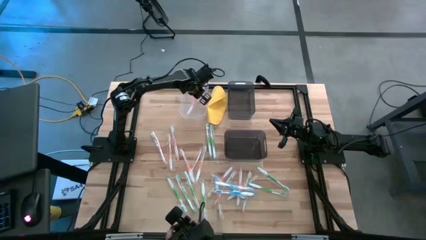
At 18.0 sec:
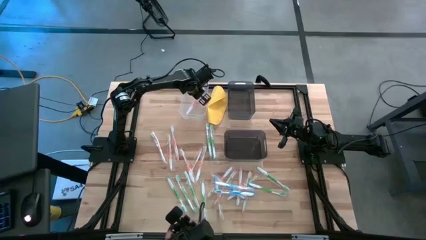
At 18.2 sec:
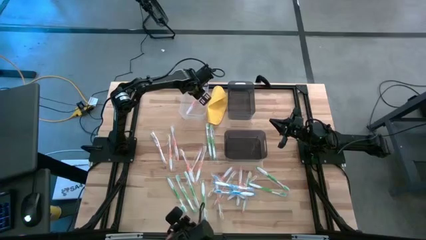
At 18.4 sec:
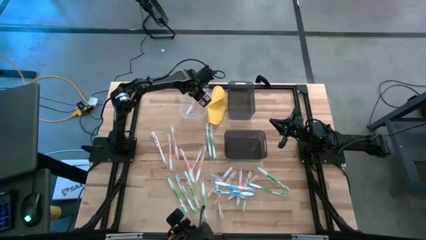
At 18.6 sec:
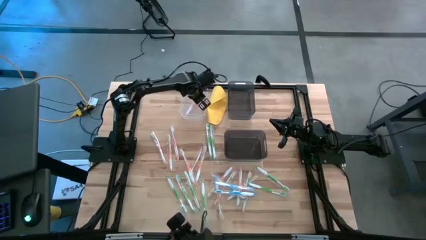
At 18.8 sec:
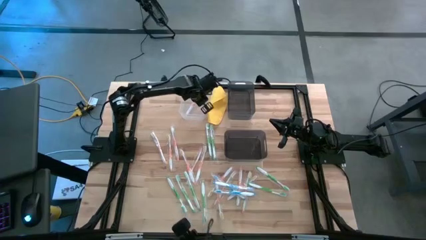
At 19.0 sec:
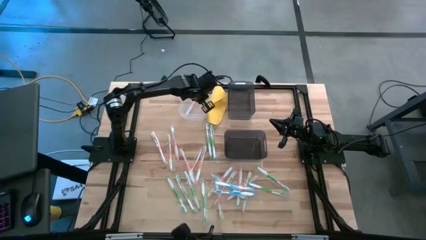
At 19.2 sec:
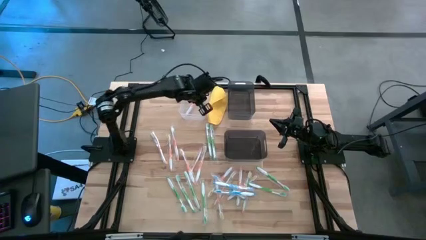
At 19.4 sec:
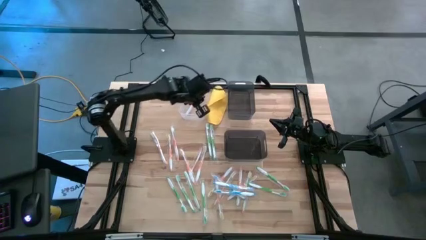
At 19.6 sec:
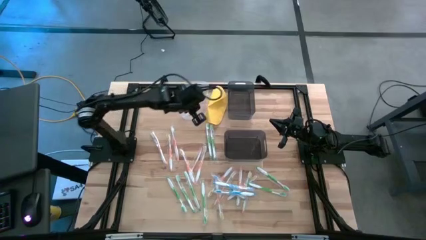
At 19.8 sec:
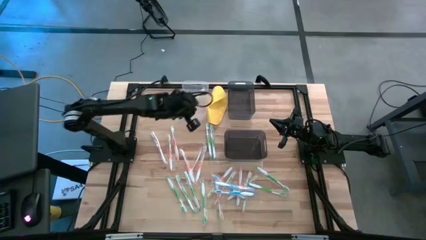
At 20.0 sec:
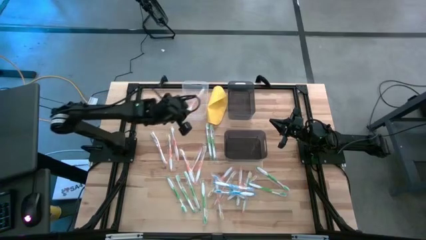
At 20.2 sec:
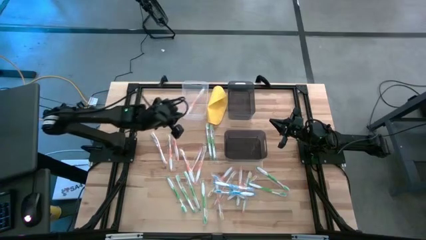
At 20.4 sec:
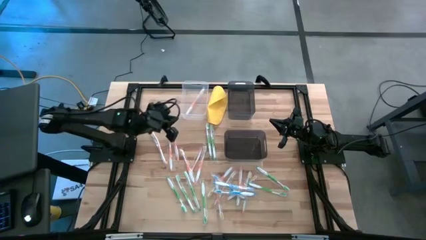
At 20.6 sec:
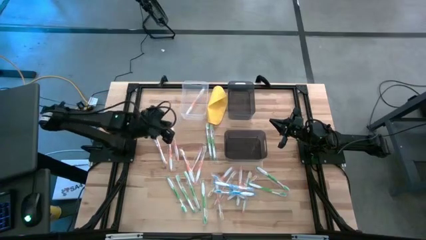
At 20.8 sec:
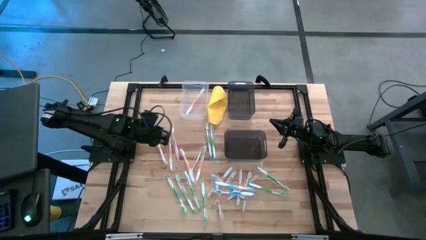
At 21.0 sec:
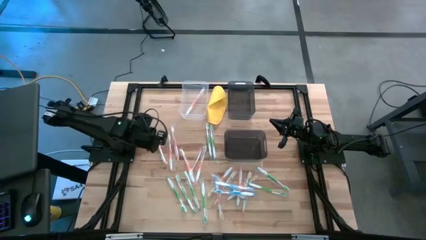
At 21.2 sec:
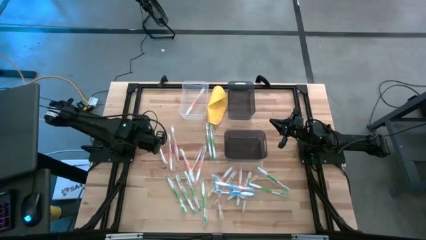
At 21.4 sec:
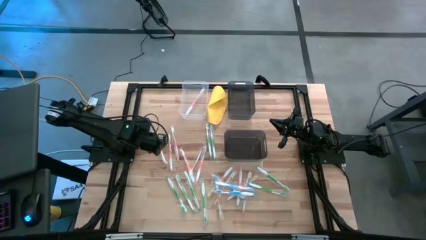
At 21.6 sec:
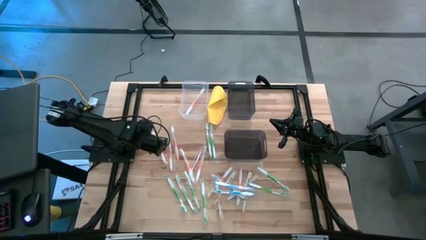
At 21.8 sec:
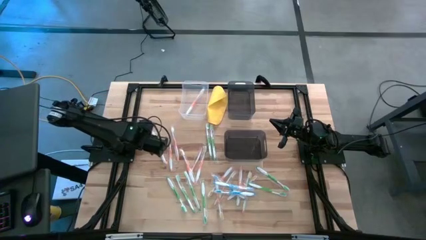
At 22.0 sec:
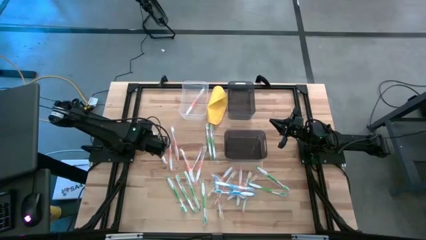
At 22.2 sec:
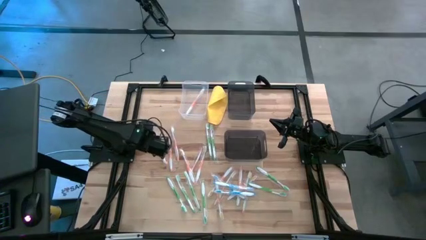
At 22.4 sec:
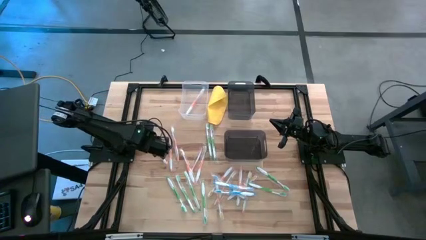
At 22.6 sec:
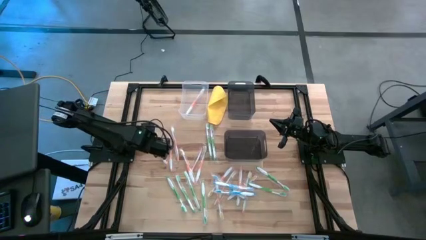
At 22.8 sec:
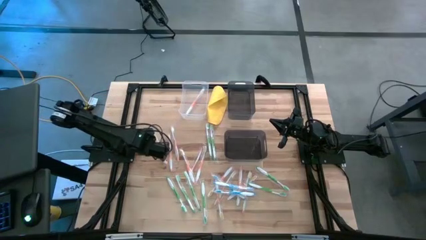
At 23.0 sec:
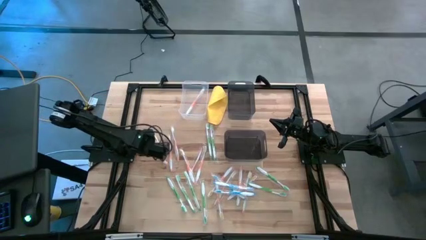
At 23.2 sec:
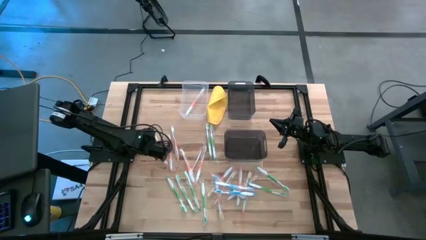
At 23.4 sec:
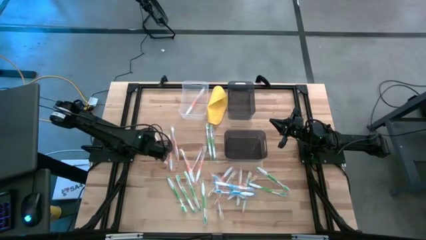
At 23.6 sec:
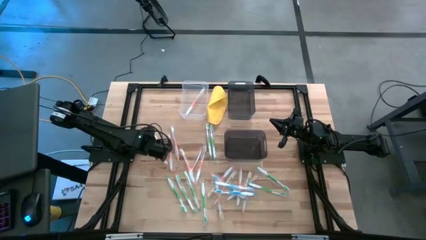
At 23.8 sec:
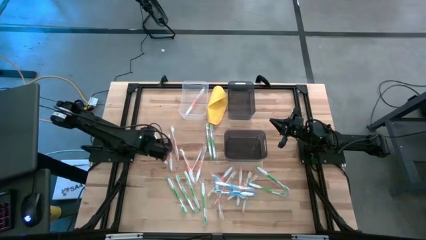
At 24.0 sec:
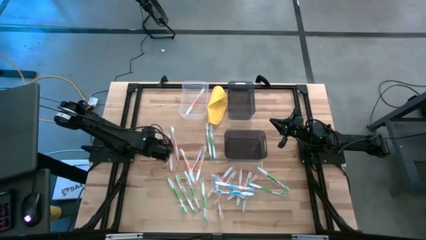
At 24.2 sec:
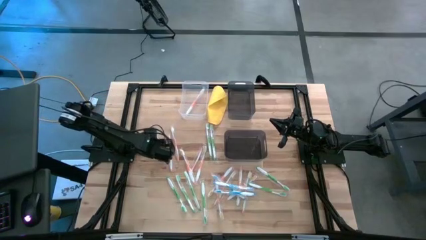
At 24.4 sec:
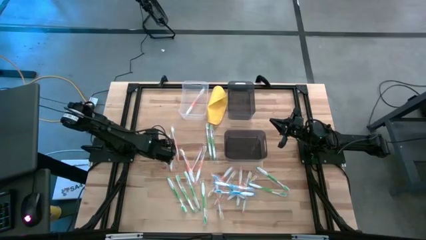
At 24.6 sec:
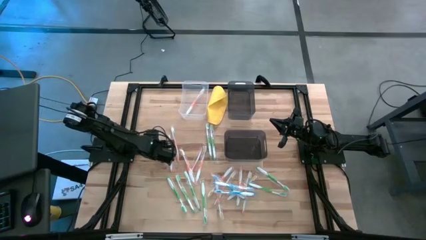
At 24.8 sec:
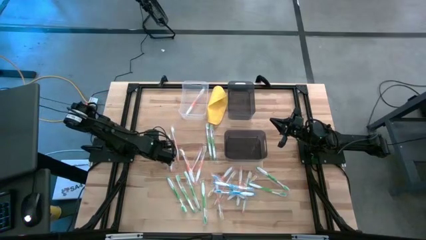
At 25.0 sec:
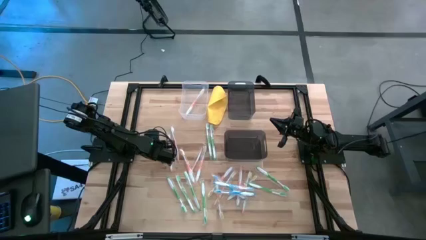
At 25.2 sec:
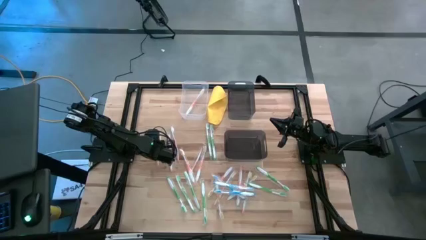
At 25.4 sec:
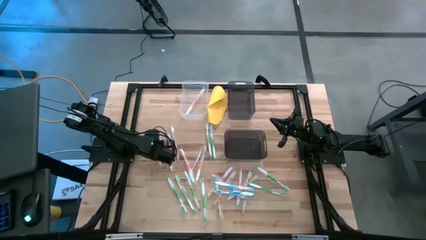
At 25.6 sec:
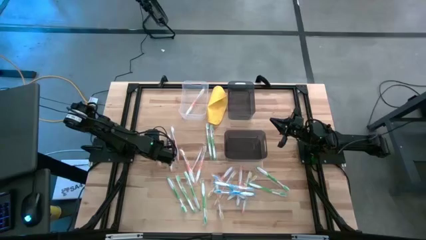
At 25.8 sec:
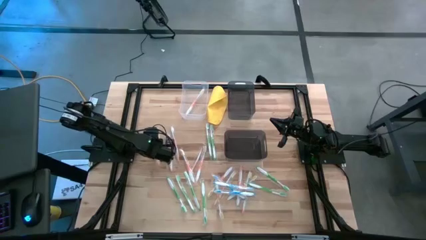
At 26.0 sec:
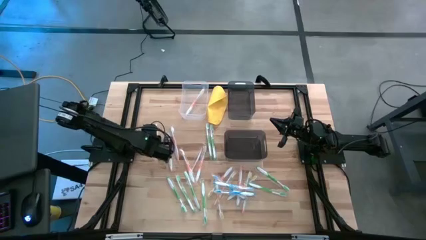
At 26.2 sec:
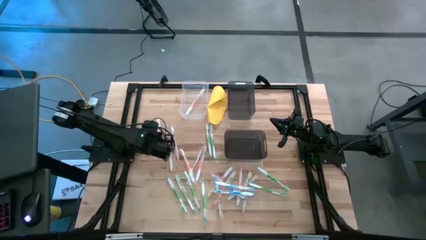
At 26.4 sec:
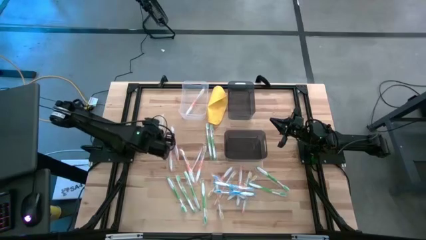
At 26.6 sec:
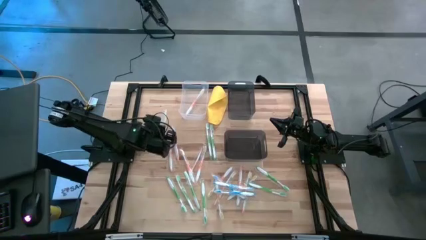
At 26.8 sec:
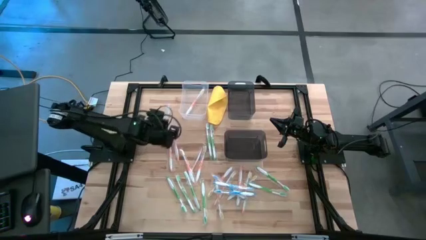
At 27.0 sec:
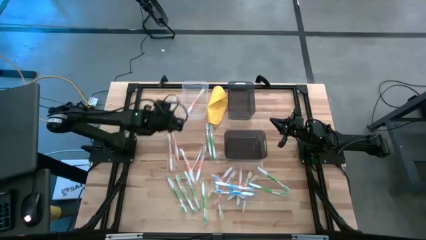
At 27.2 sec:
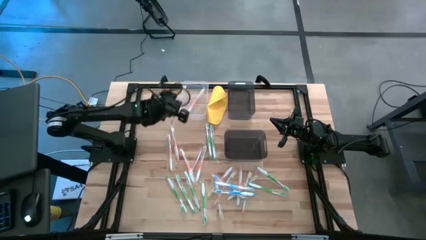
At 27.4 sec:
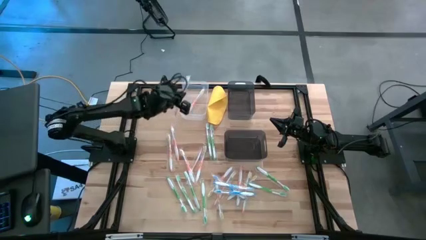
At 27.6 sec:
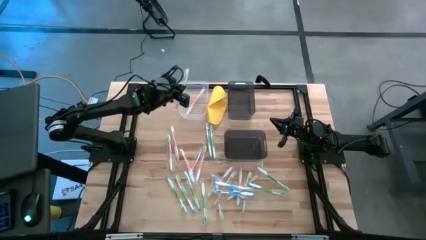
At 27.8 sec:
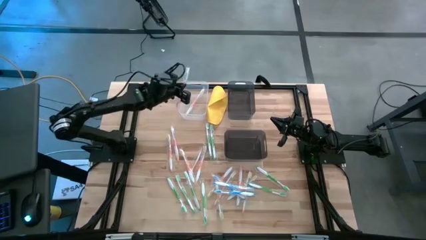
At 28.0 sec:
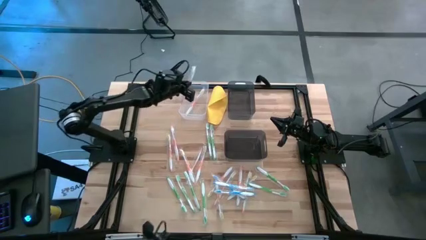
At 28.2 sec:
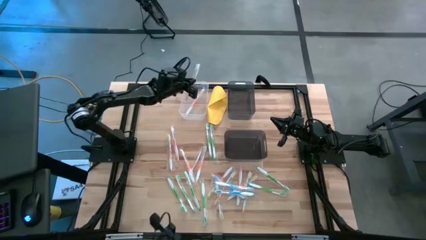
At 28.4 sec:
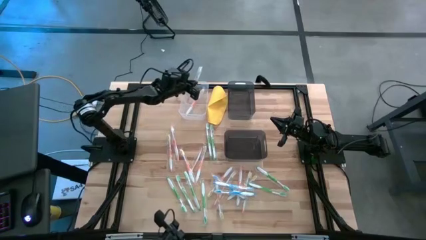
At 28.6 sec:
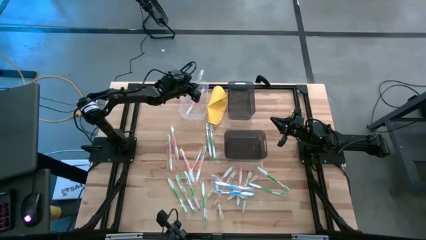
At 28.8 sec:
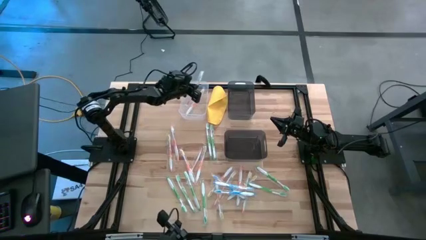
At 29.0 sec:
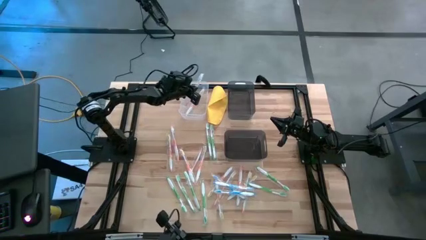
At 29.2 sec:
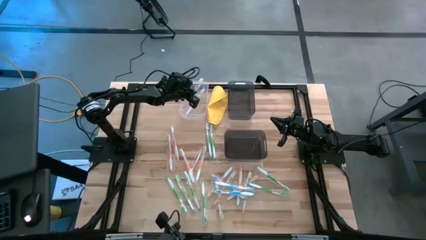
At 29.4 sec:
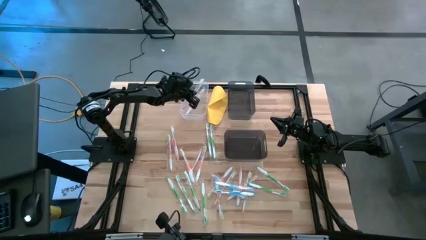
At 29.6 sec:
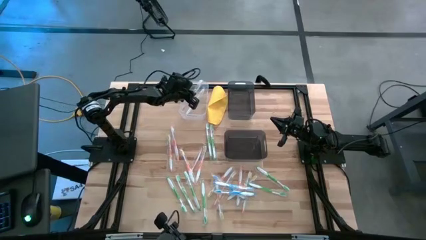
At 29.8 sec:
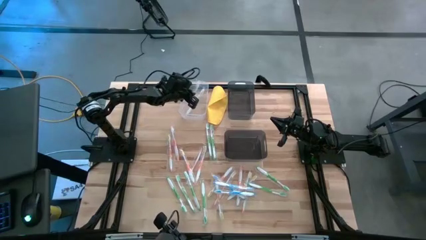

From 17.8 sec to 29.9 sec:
Task: Pick & Place Toothbrushes
Put the orange toothbrush into the transparent bin

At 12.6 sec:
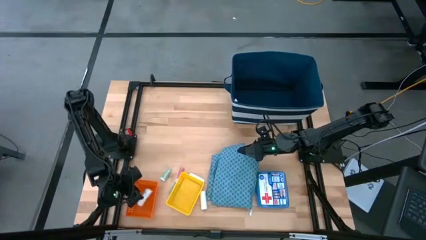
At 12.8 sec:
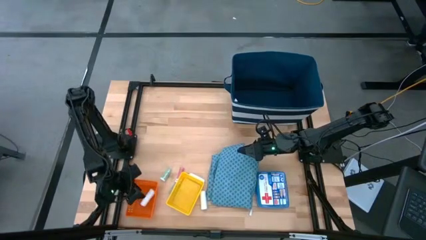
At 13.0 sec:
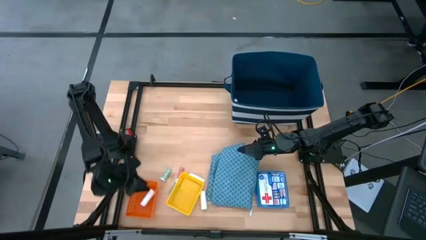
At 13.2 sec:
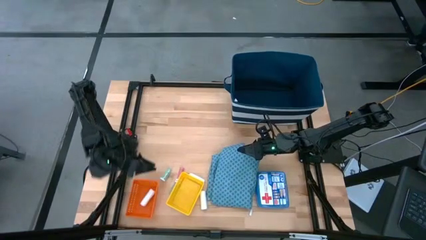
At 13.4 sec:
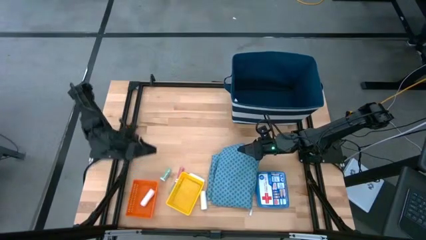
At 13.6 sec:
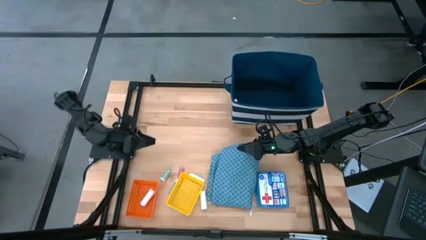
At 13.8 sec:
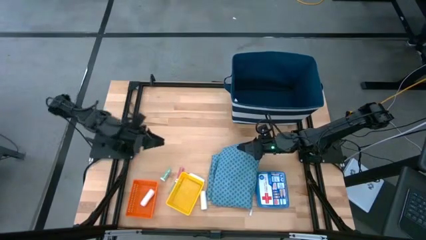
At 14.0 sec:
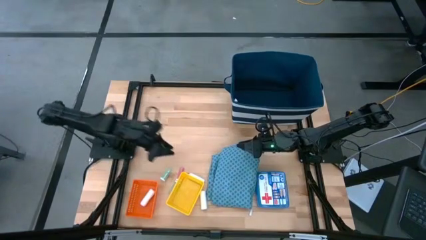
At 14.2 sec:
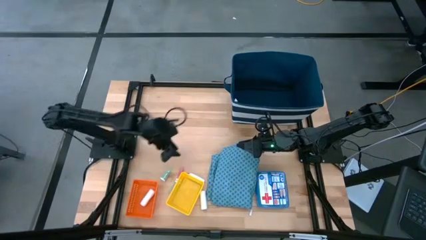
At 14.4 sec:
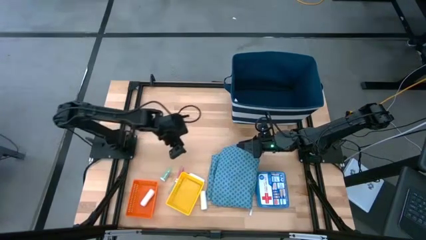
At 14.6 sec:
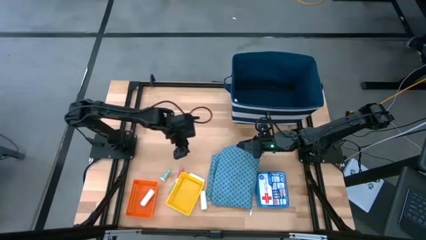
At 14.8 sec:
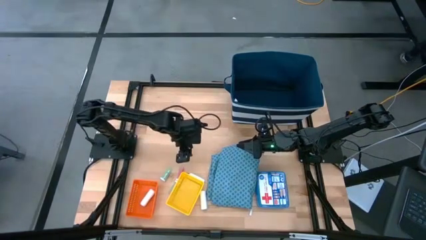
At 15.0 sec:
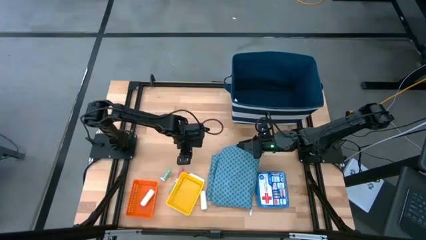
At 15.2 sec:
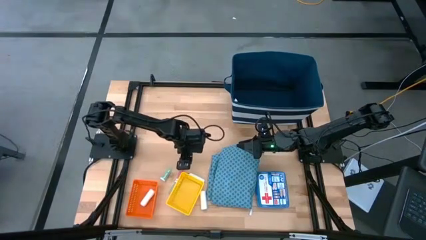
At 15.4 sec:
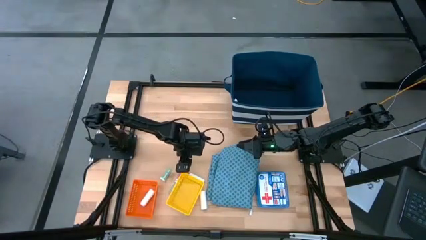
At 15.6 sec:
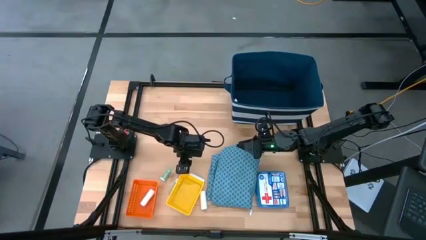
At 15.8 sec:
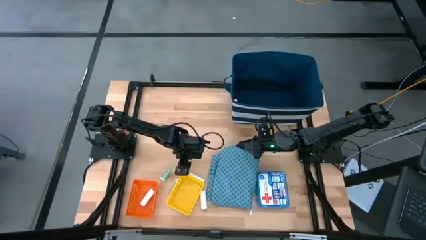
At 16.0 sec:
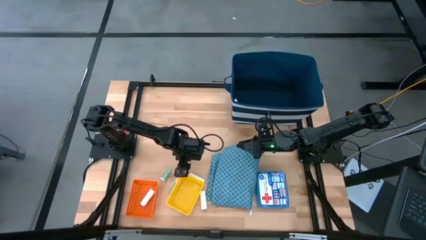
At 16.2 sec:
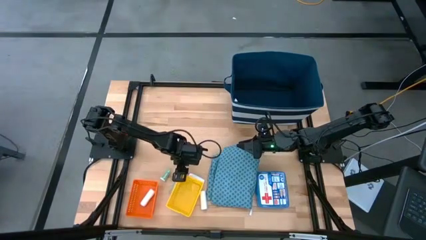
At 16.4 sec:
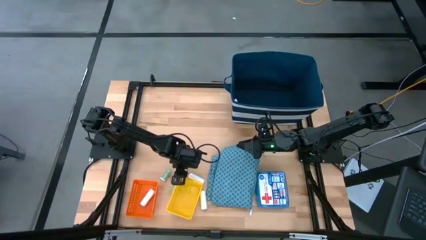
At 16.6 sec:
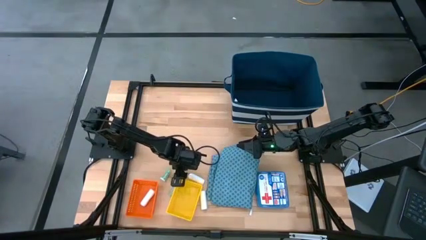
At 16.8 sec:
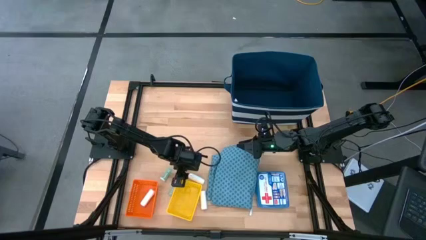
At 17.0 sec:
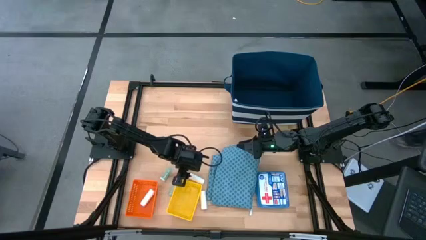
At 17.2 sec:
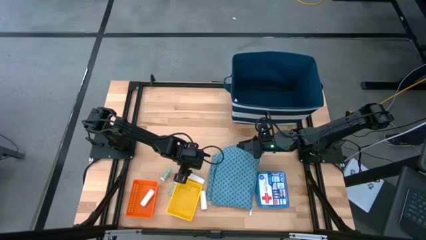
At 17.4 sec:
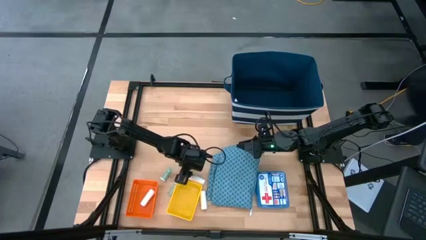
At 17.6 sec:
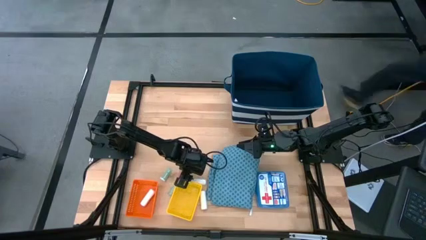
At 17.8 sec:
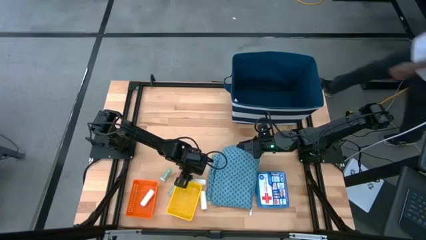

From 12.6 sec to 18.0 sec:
Task: Pick & Place Medicine items
Put the top white rolled gauze into the orange bin
